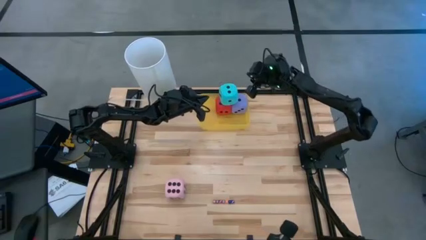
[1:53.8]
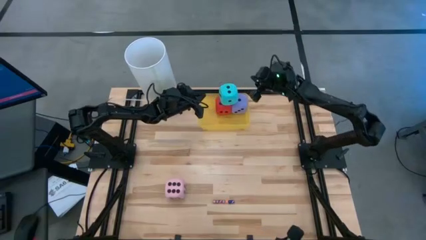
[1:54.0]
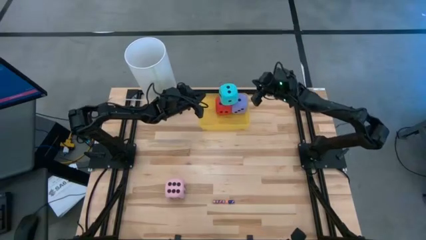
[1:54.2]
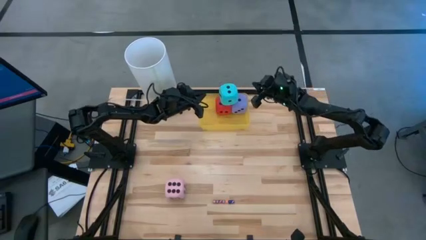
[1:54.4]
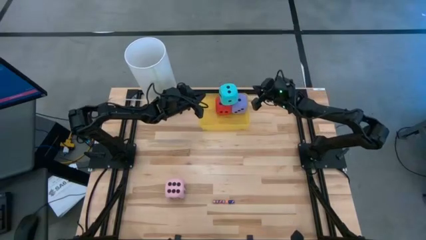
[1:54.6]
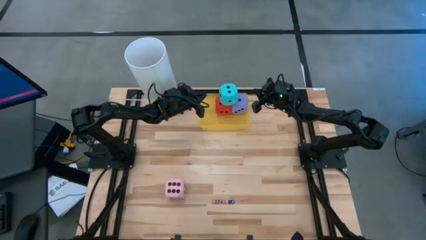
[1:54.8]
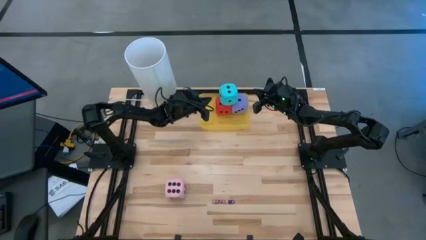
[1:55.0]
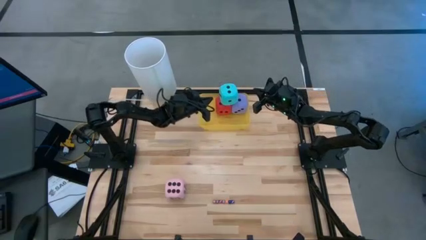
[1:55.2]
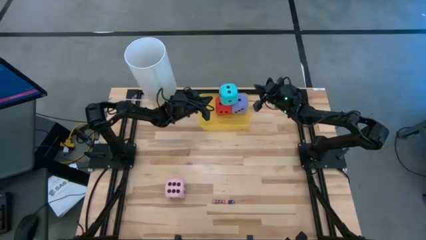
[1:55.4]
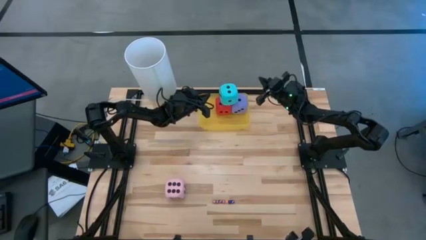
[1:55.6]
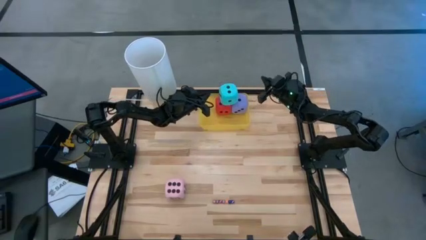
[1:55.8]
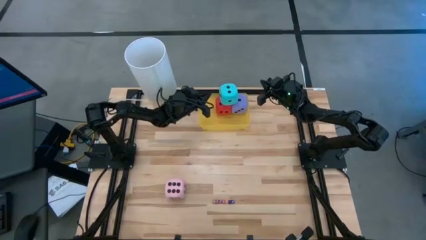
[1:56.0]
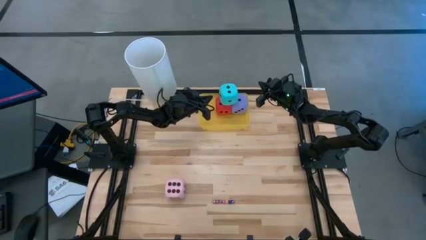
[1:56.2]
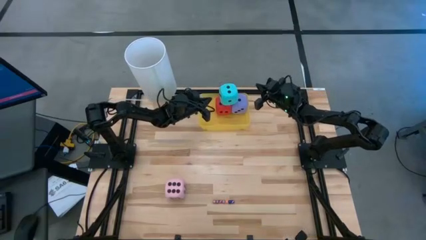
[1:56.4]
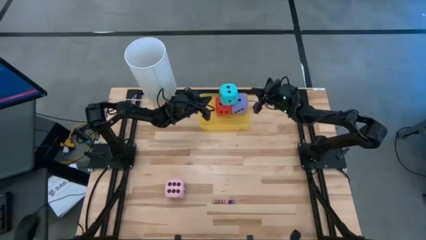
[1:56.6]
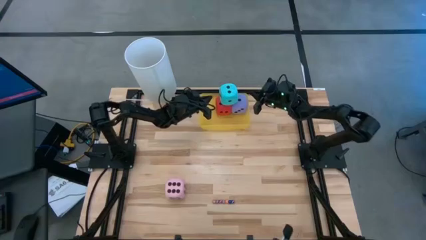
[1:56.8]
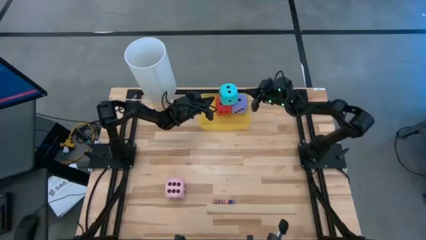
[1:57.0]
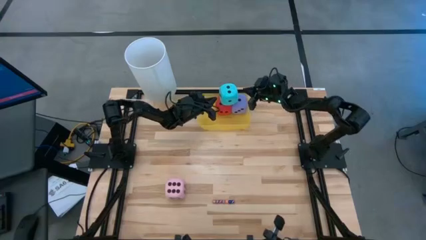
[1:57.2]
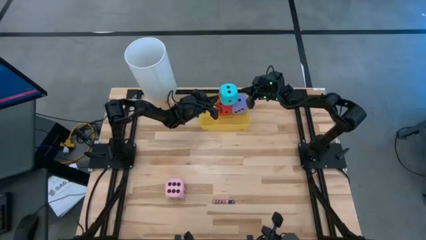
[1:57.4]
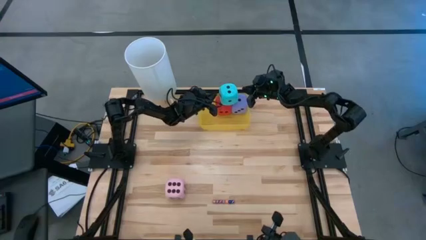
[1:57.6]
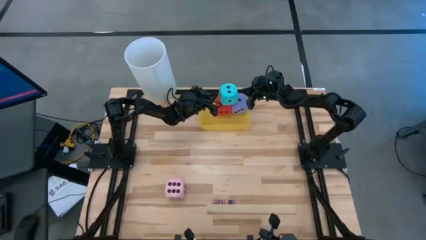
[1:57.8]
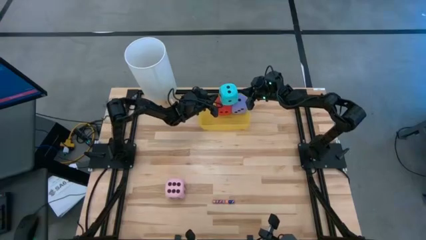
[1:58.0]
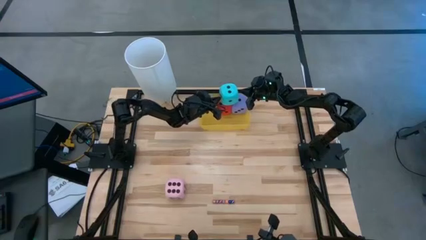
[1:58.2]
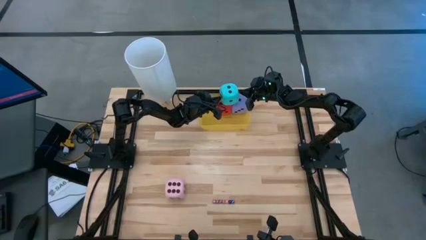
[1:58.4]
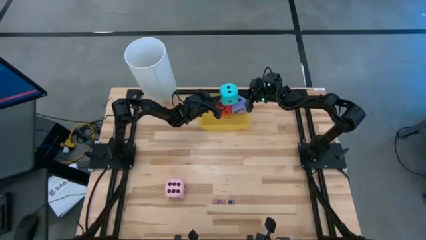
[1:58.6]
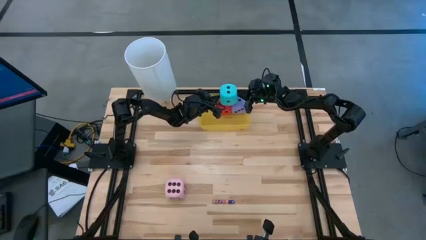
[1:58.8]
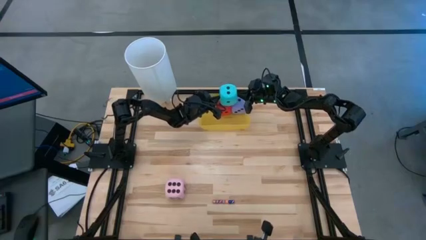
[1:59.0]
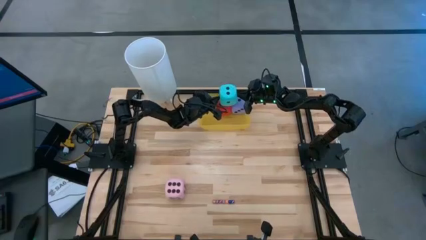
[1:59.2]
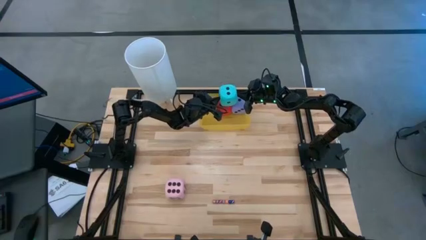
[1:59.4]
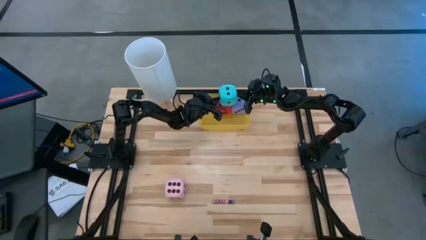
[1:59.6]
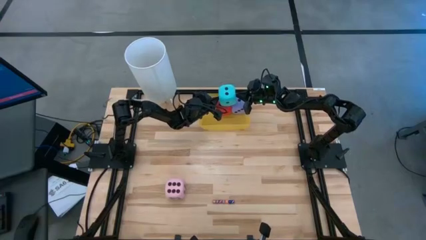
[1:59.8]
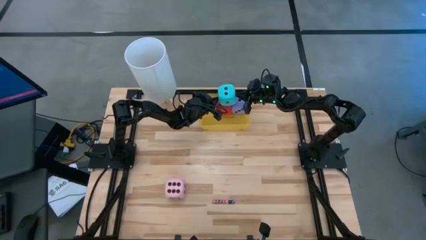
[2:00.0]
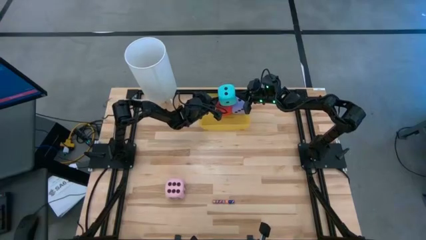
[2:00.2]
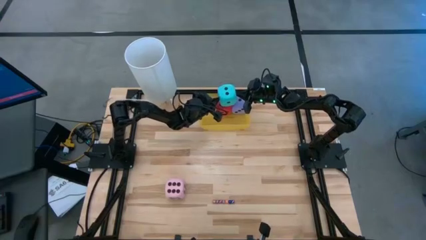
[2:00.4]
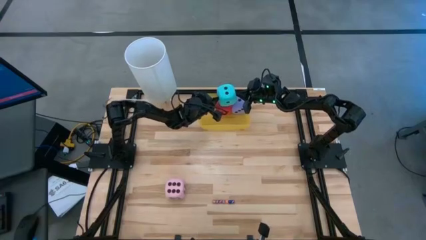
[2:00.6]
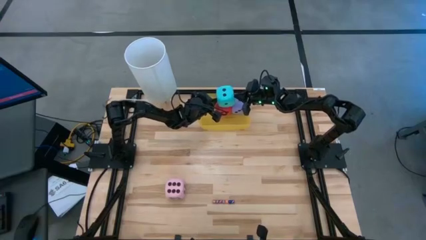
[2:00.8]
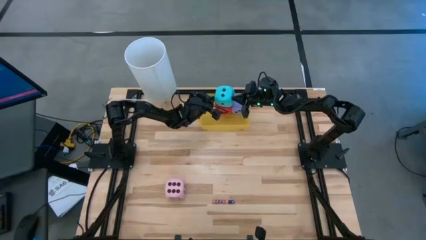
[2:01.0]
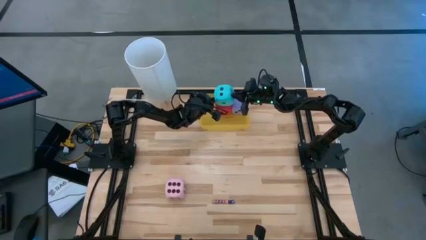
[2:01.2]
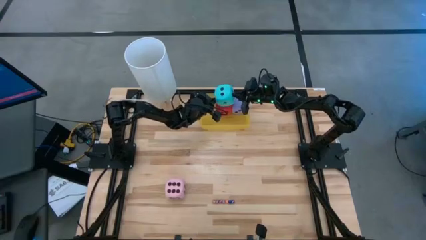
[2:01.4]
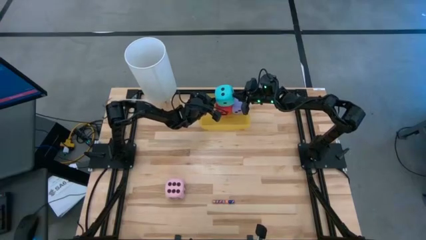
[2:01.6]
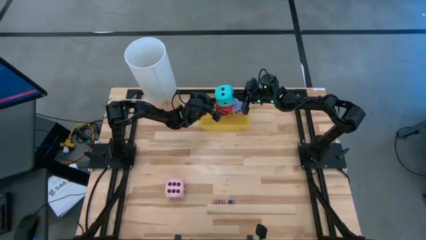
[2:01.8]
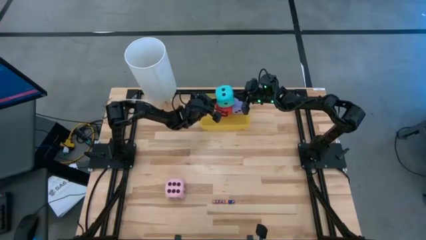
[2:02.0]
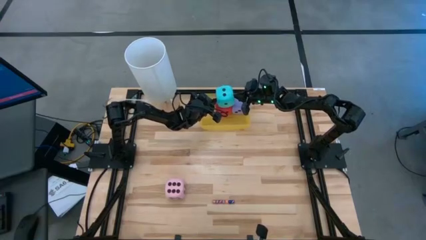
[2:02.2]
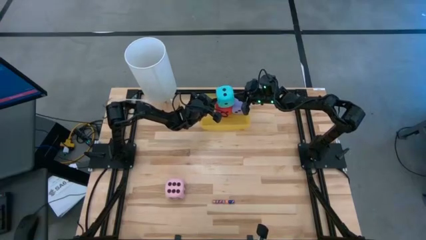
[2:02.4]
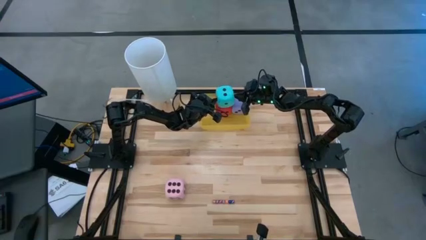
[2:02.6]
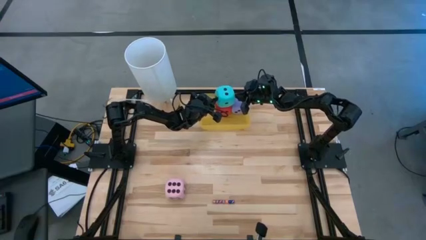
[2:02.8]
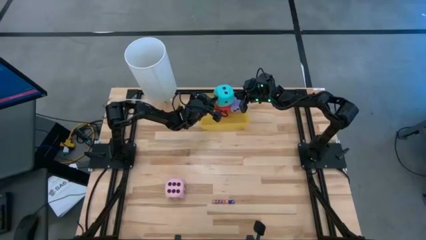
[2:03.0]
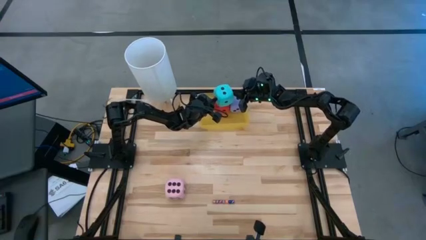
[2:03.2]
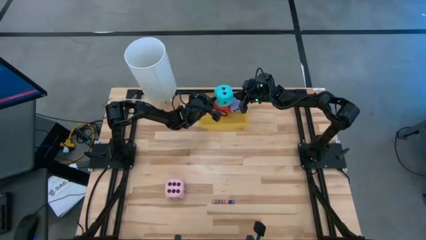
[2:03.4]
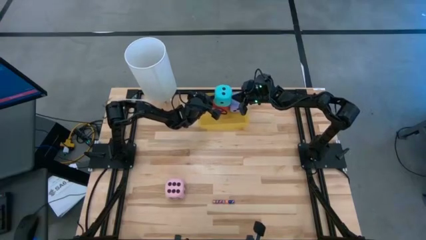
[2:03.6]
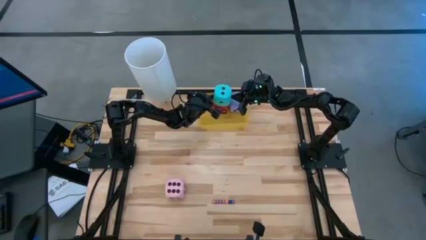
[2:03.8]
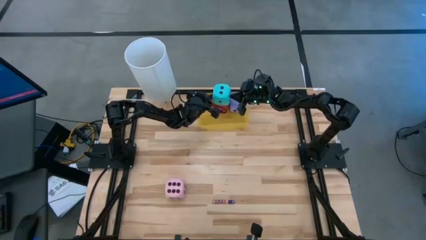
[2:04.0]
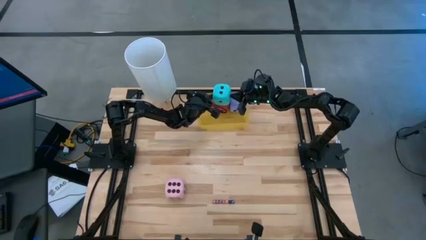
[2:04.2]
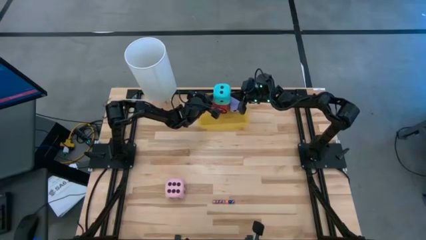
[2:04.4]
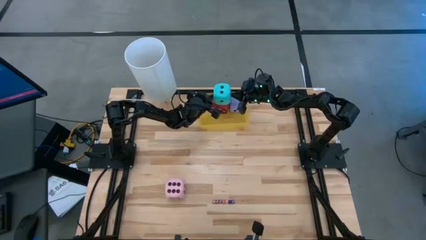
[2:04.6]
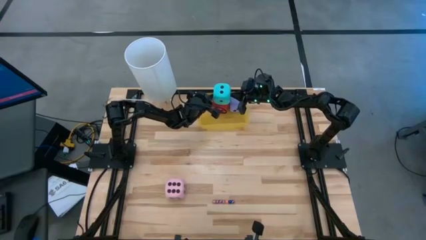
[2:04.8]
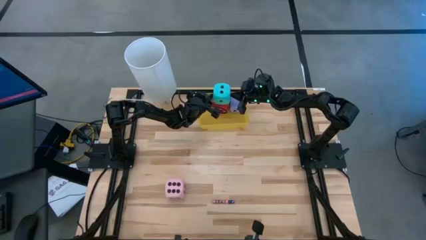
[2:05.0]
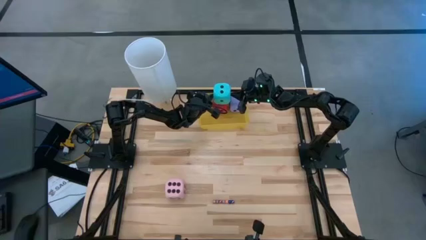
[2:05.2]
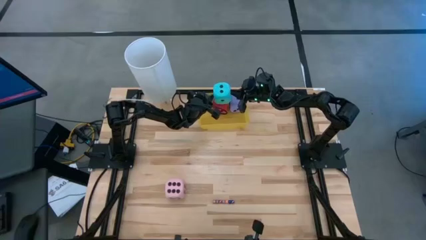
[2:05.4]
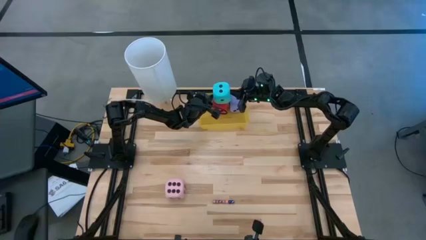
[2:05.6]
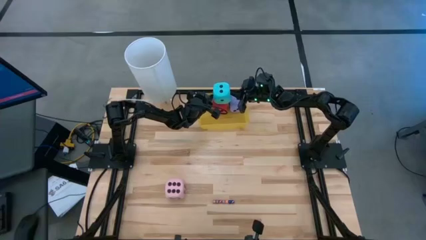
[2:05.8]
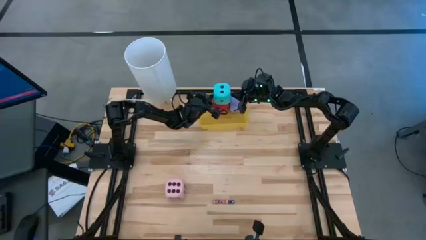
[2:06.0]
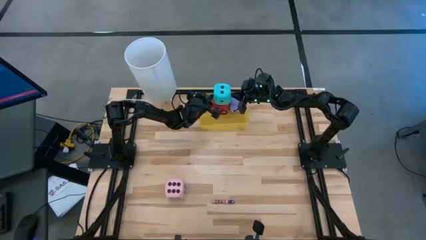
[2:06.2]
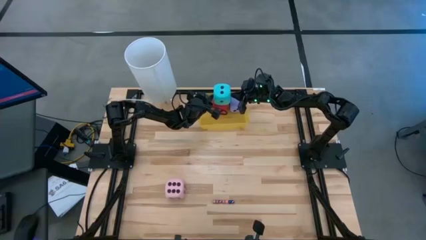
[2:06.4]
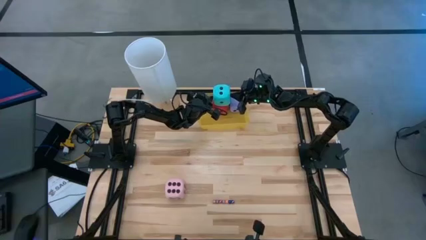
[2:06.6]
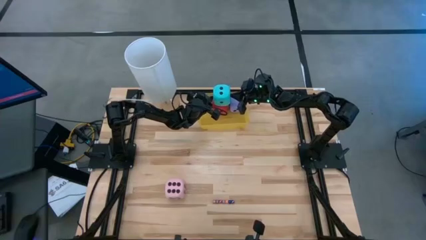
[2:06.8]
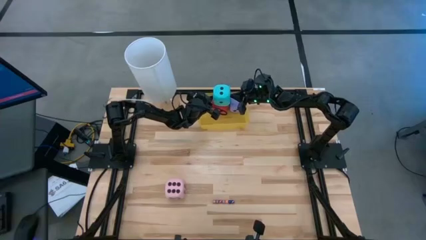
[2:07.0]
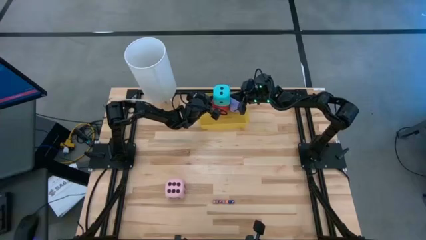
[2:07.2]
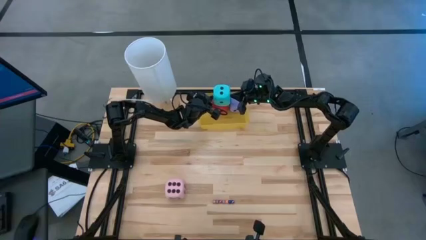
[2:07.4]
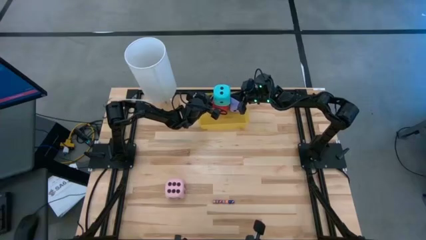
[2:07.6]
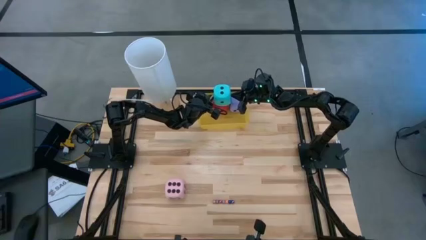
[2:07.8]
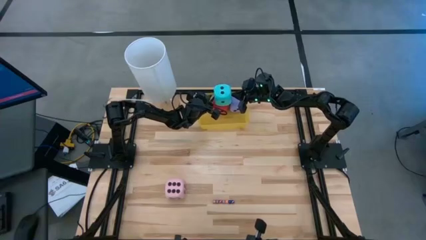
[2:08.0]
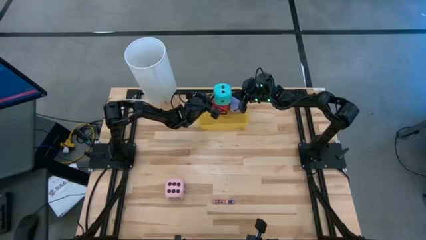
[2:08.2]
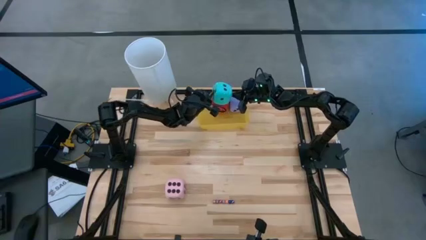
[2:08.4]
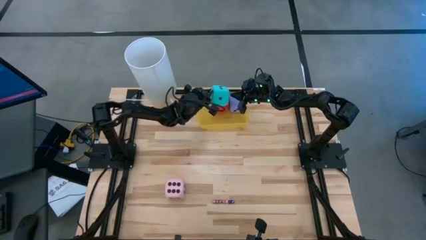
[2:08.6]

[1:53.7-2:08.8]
Task: Pick & Place Dice
Put the big light blue dice into the yellow bin
